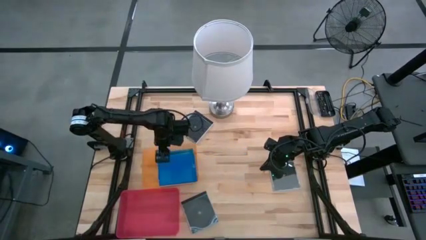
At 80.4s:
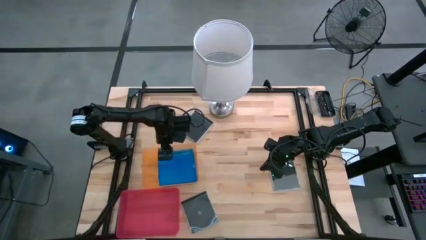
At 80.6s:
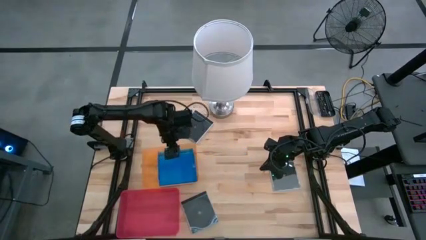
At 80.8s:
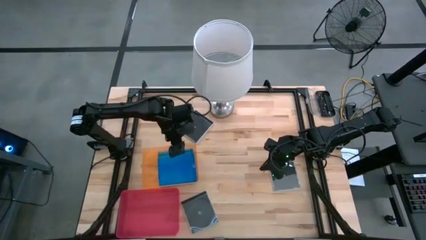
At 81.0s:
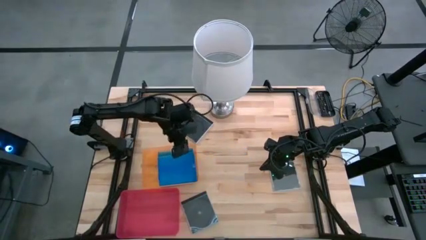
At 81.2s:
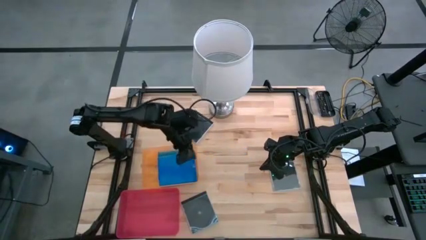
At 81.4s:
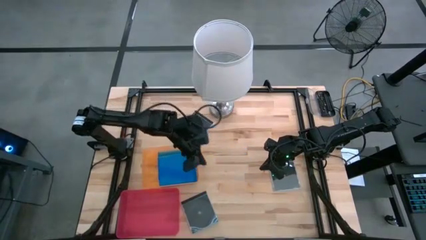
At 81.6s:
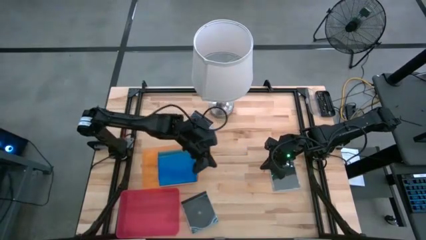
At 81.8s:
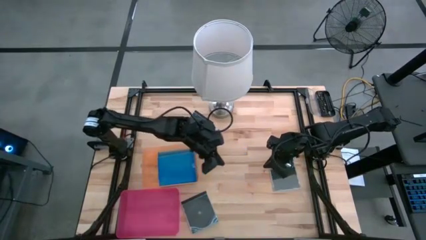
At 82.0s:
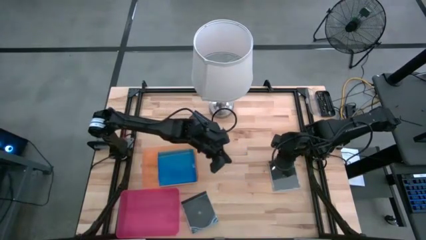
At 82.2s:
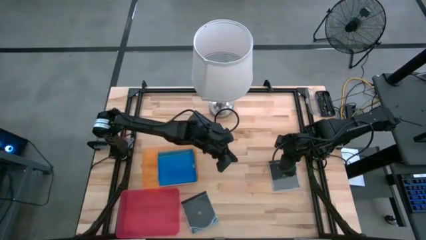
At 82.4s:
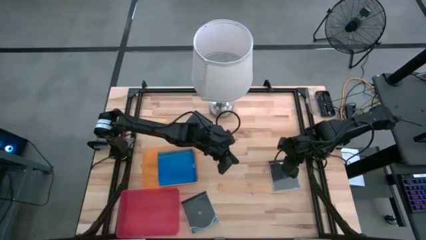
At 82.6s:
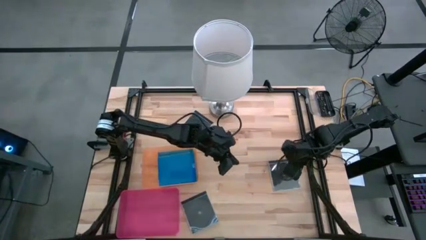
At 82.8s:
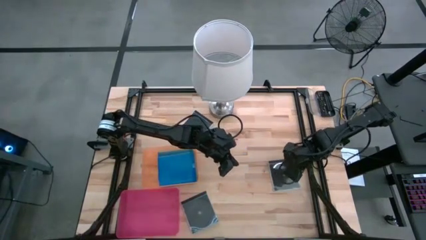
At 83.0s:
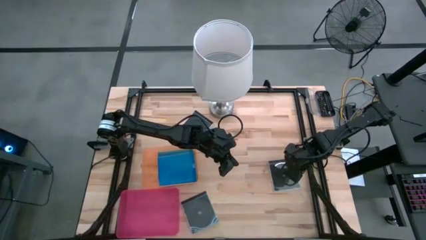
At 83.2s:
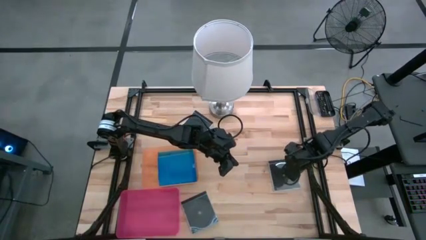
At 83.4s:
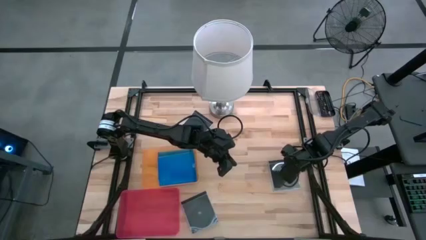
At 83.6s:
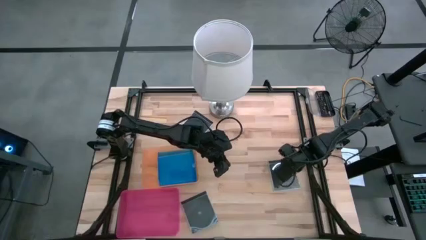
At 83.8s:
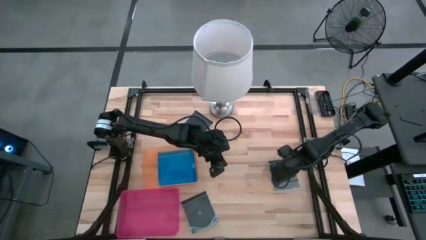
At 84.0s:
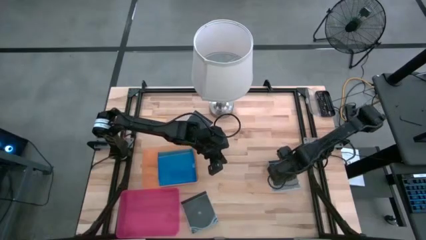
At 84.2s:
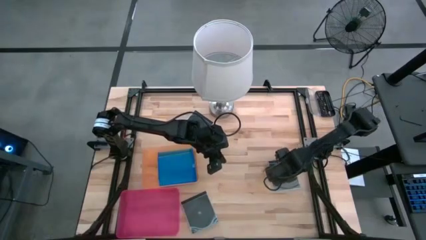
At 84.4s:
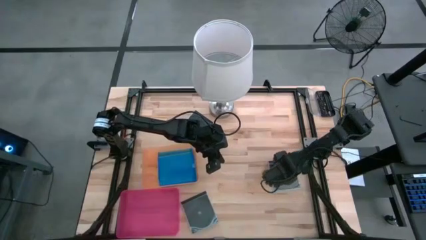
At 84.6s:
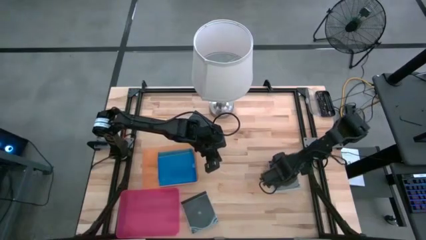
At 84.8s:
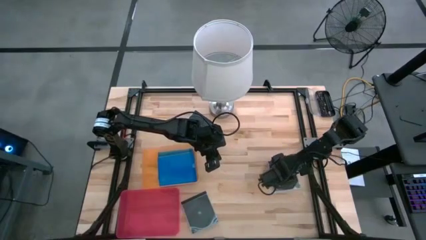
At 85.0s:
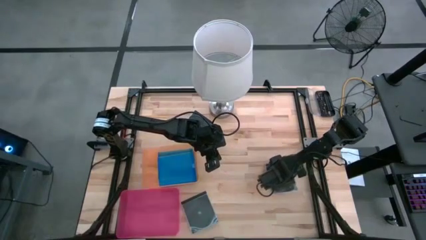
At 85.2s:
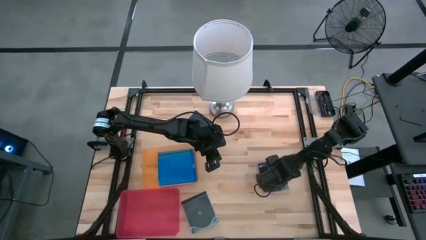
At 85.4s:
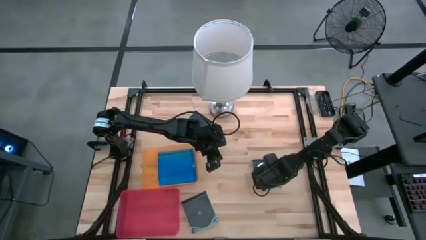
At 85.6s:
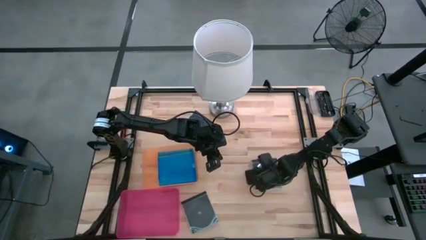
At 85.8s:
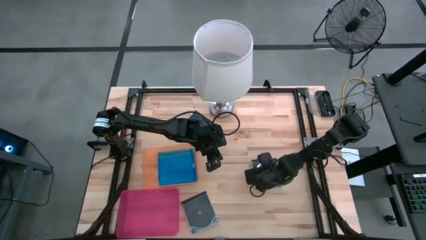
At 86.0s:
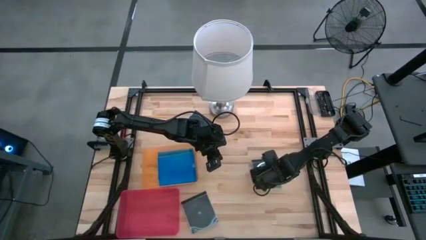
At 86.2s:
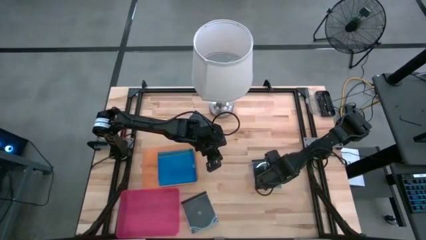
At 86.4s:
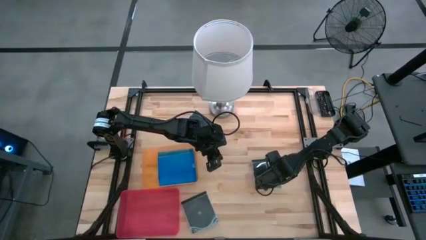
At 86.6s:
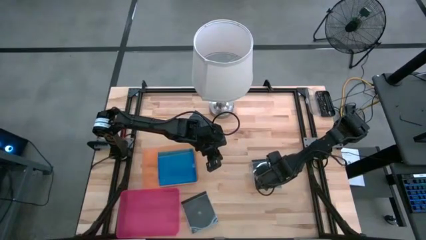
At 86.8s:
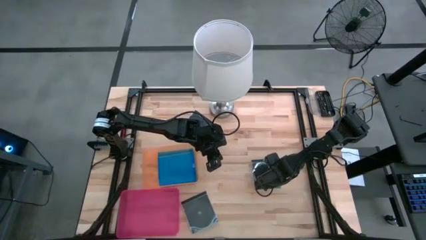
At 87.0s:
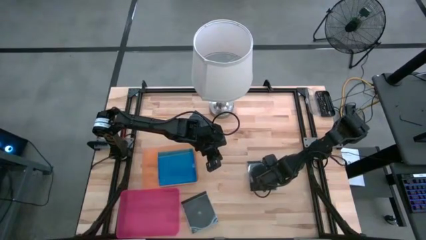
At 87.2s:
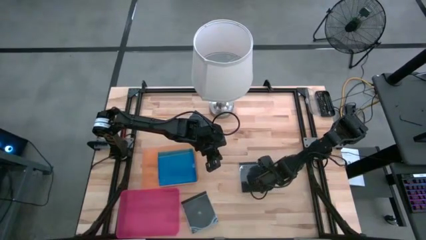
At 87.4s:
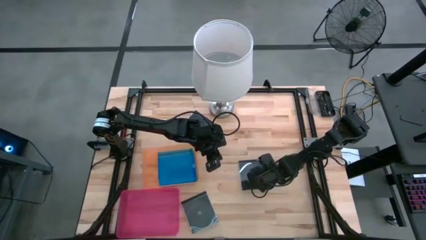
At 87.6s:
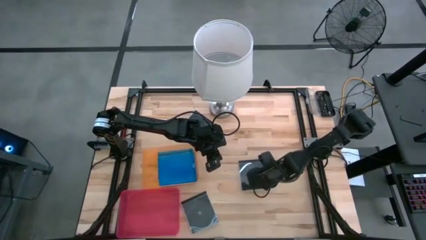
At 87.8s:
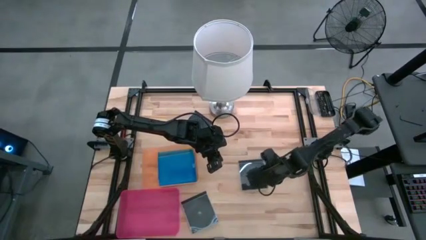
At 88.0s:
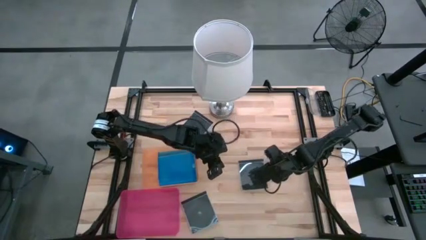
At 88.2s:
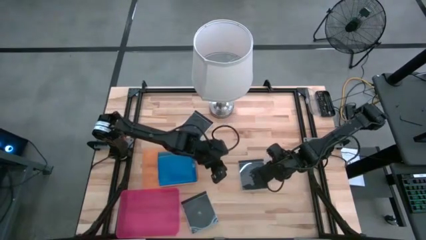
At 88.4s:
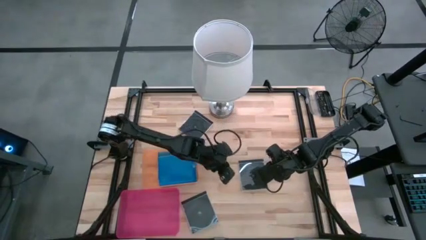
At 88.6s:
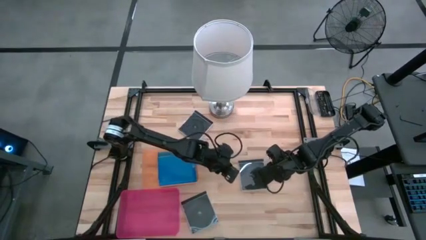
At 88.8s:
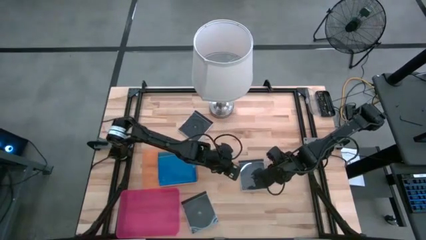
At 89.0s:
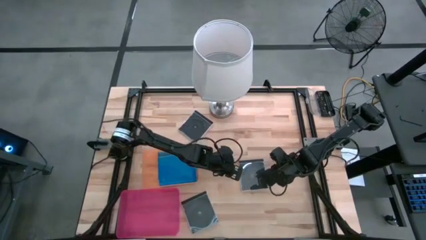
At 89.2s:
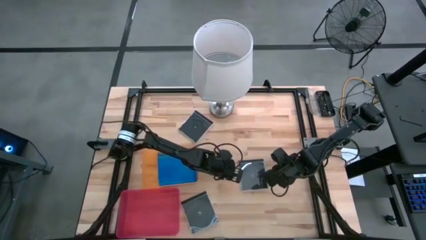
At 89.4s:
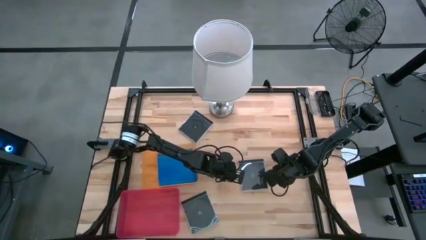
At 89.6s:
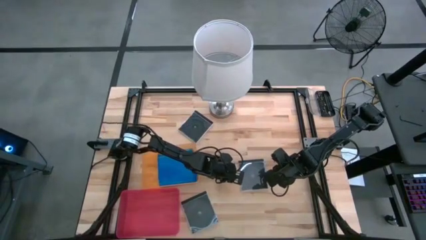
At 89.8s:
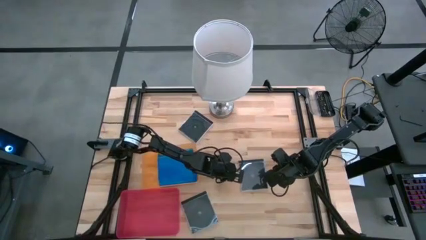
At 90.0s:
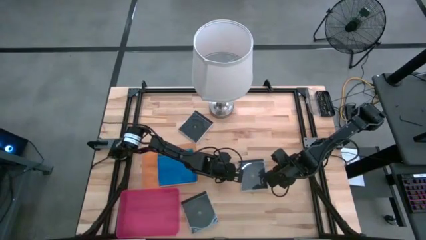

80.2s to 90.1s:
Task: Pick & place jewel cases by type
Put the middle black cd case into the pink bin

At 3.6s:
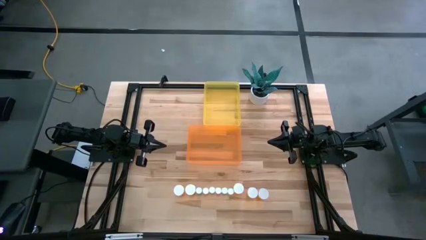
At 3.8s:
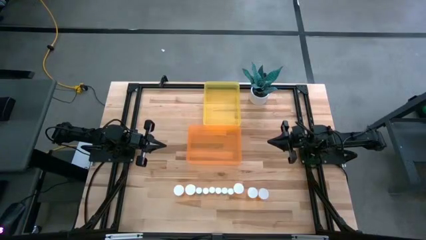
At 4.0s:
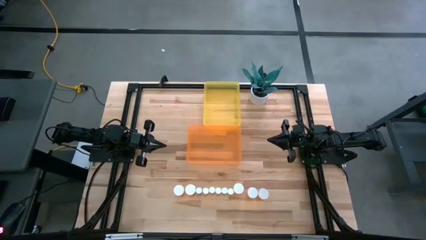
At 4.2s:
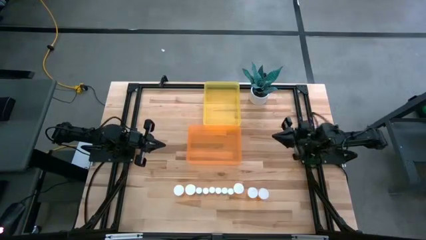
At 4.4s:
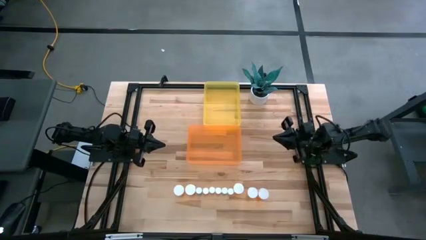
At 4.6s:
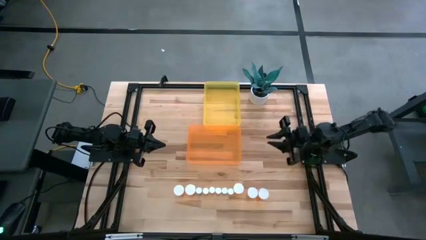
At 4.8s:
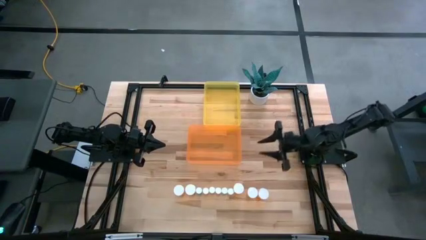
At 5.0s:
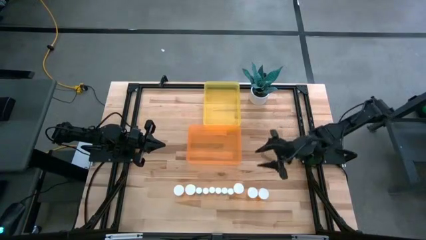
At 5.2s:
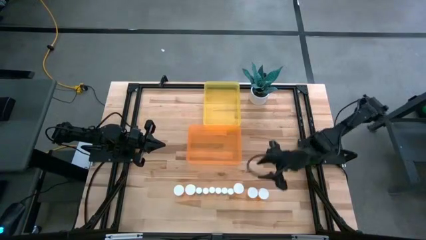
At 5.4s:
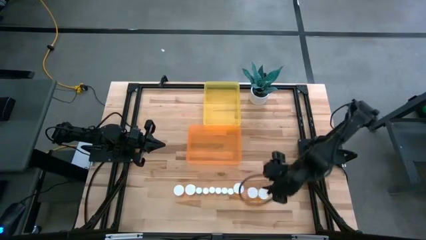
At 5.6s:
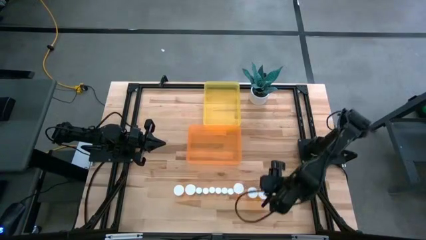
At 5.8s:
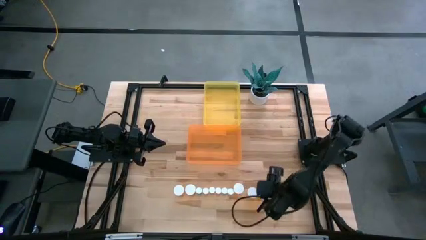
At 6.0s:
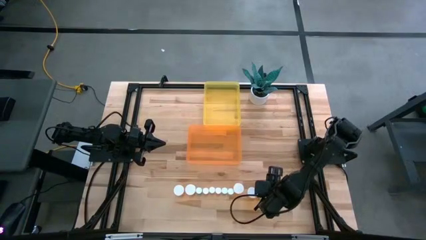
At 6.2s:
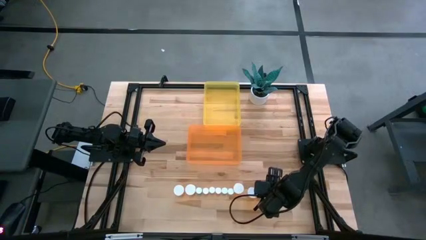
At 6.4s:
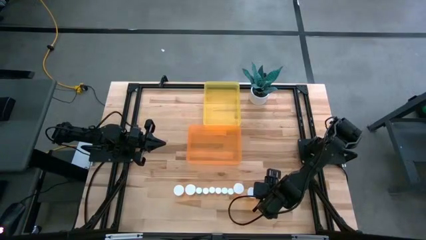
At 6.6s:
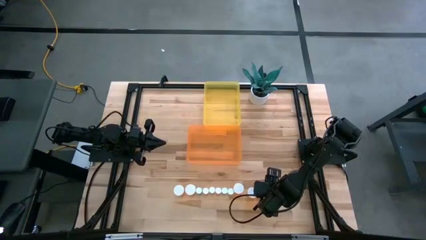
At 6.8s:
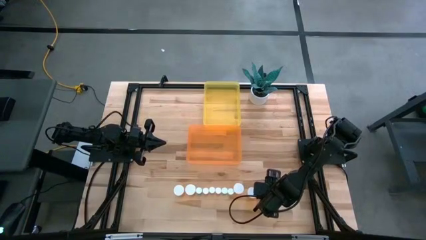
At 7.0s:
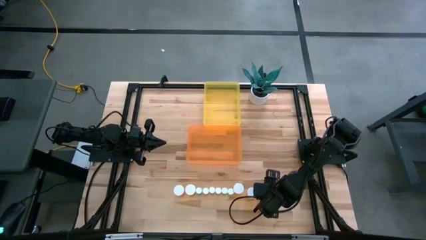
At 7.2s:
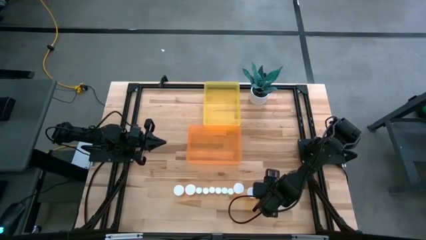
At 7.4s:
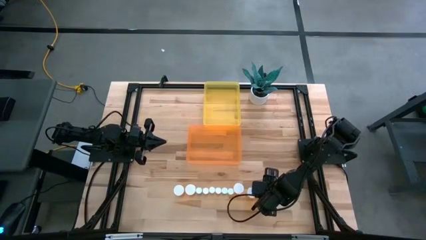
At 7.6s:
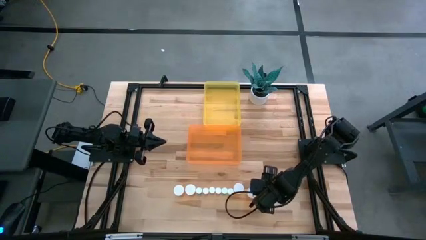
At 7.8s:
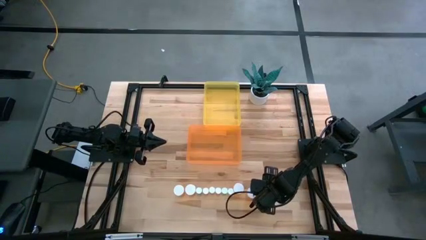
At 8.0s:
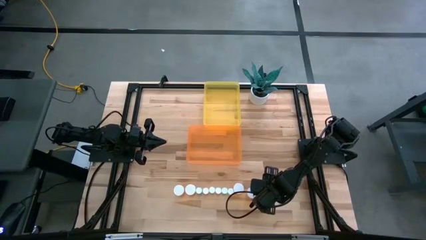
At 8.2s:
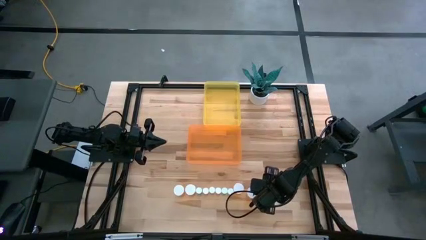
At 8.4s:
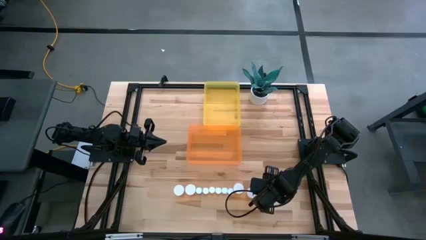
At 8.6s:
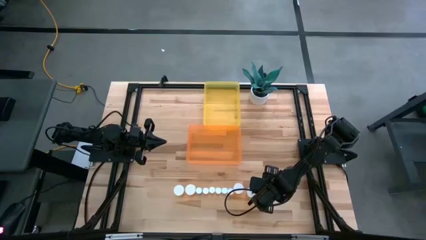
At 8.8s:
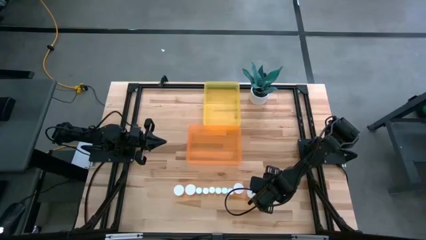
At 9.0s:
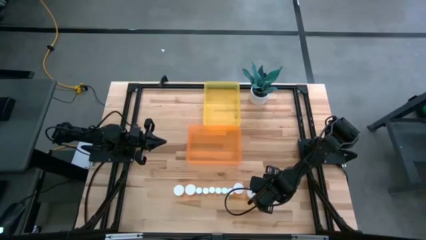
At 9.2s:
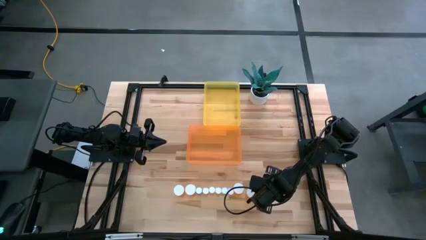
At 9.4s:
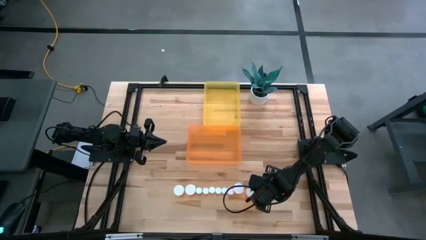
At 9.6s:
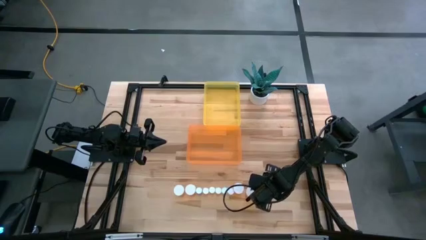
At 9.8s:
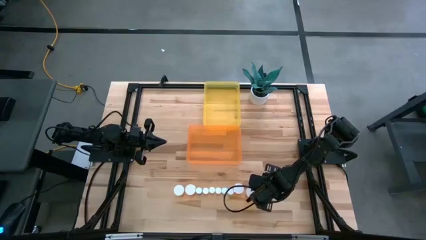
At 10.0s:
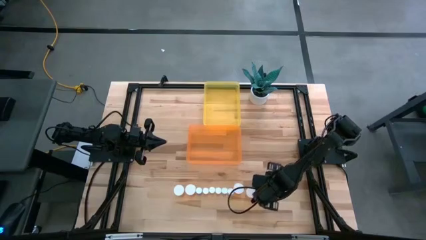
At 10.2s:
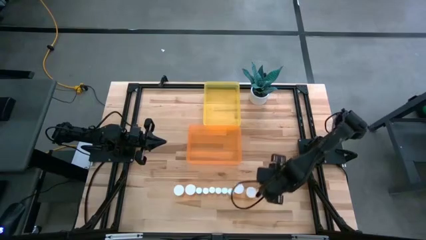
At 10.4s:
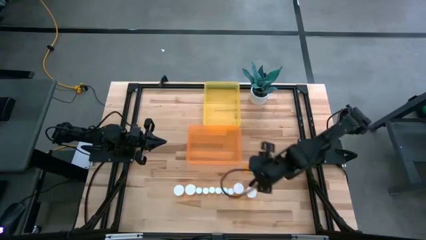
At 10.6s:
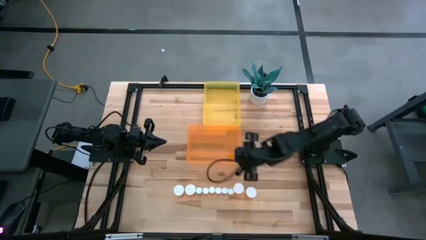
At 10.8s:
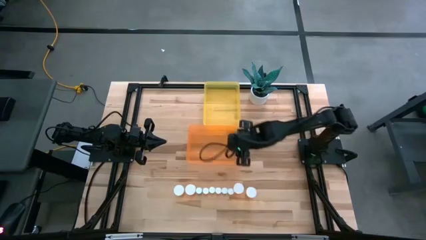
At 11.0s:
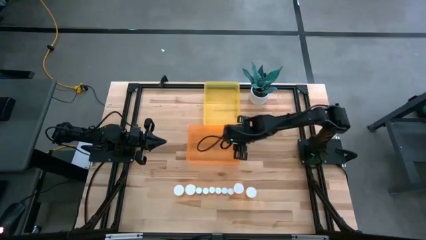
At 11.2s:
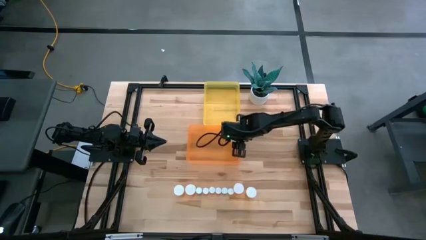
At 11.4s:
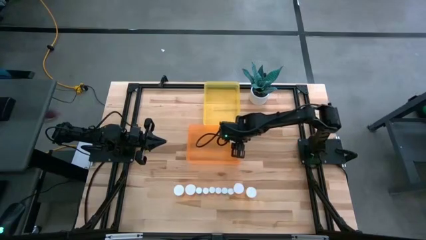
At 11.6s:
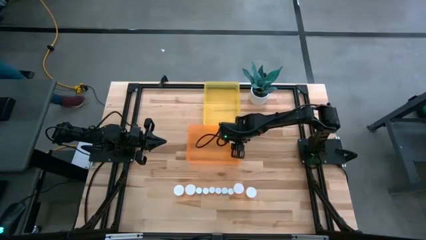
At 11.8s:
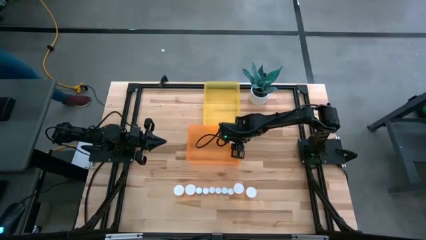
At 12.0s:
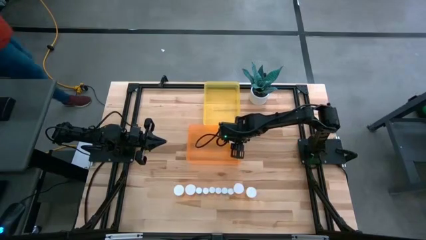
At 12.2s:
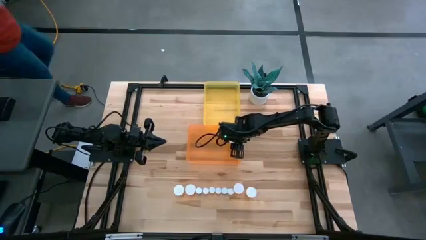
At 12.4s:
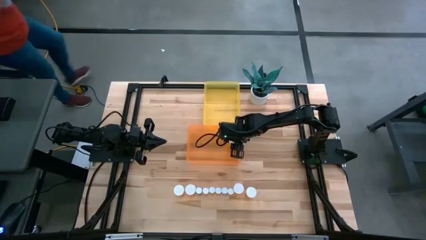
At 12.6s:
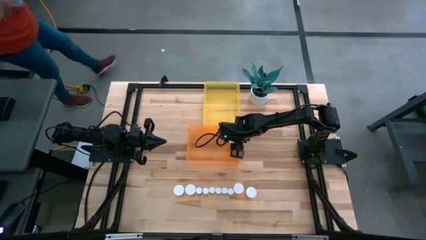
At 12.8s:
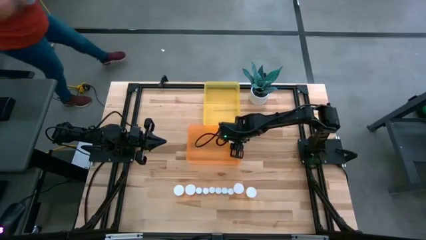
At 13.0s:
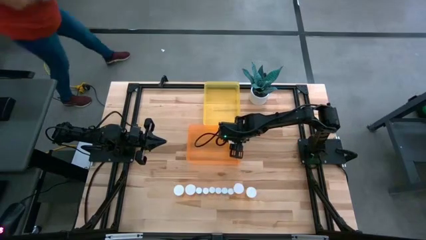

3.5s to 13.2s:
Task: Pick and place medicine bottles into bin by pill shape (circle, oval)
Put the big orange pill bottle into the orange bin
